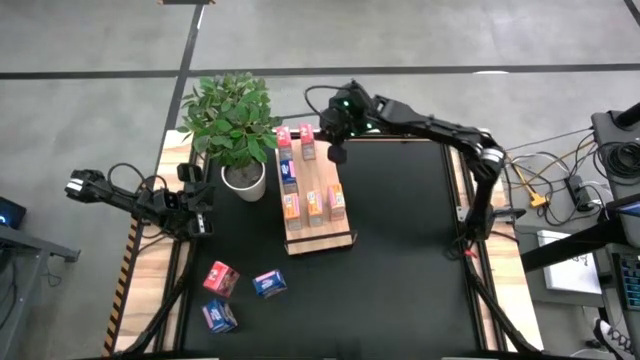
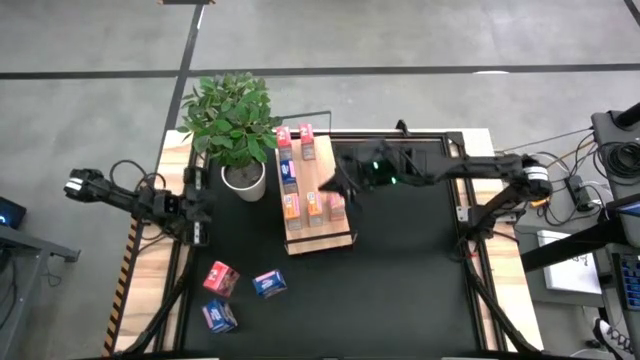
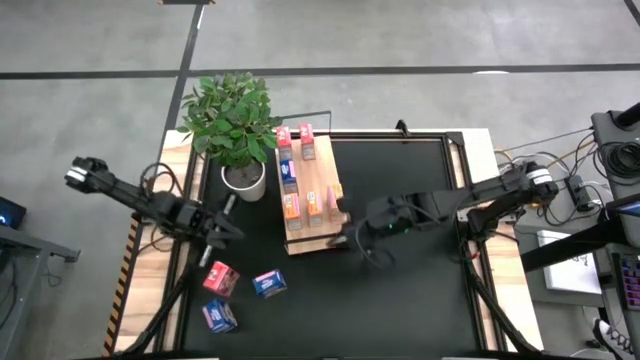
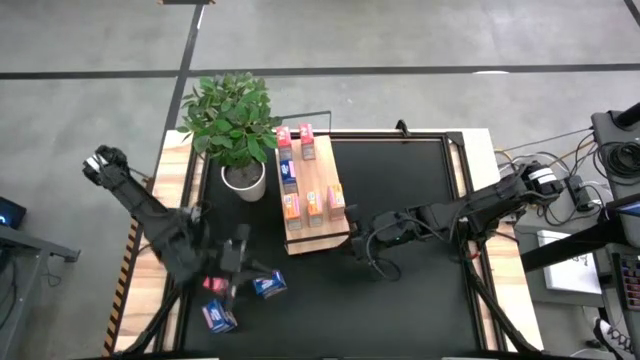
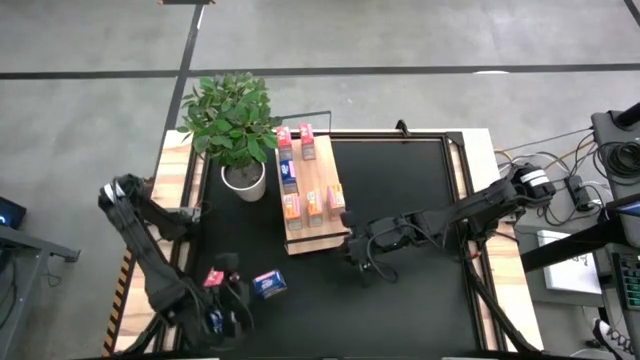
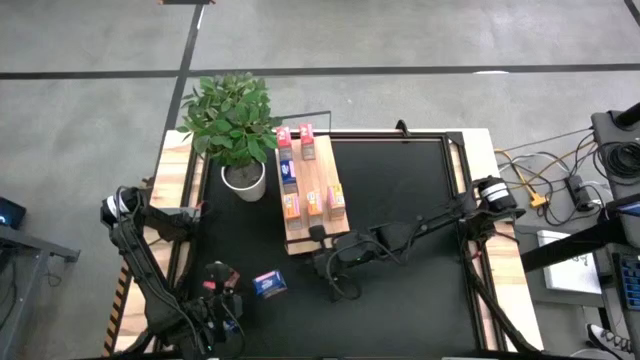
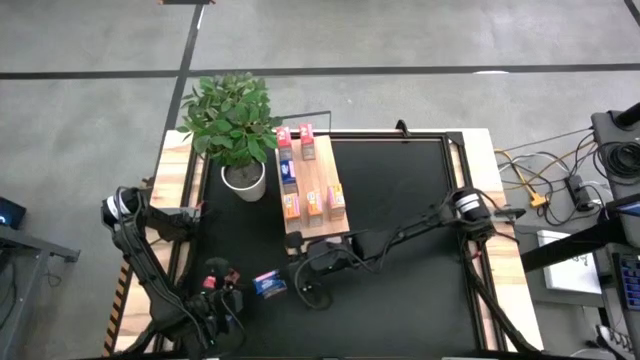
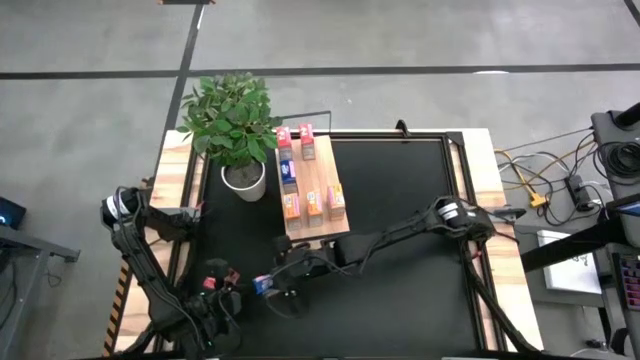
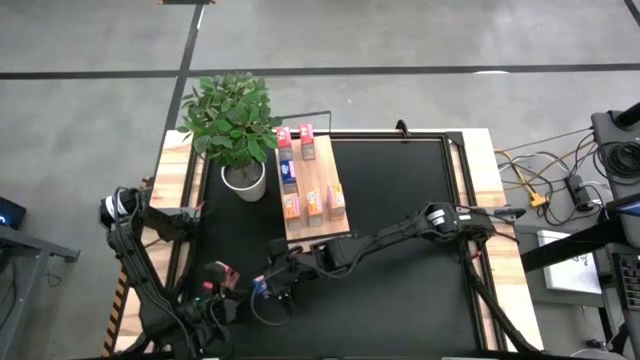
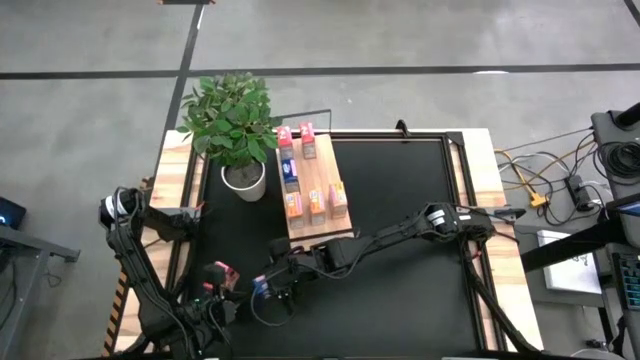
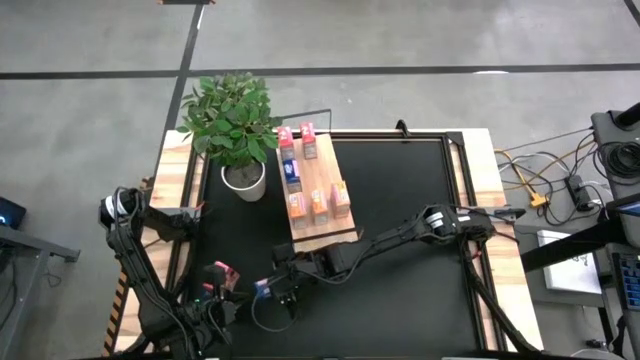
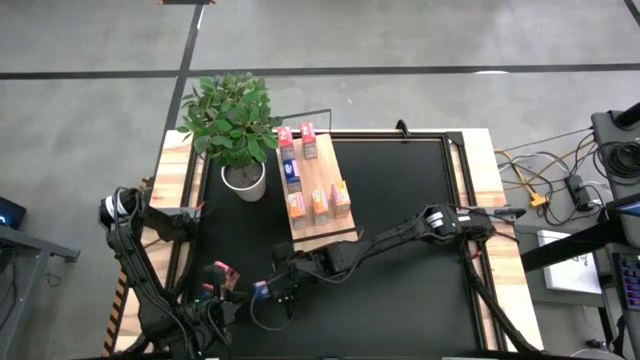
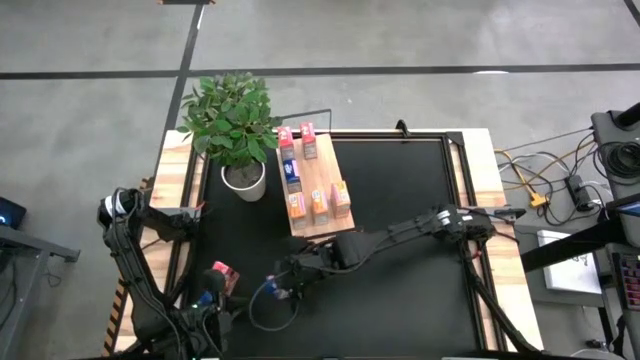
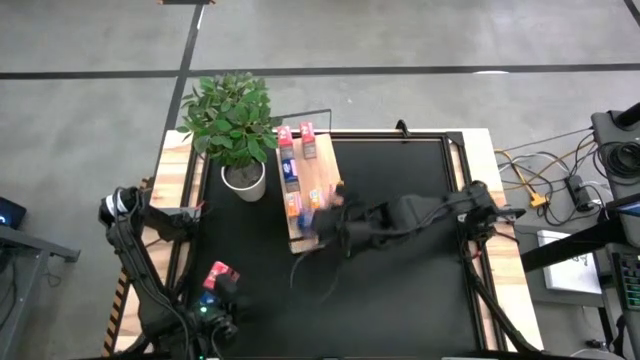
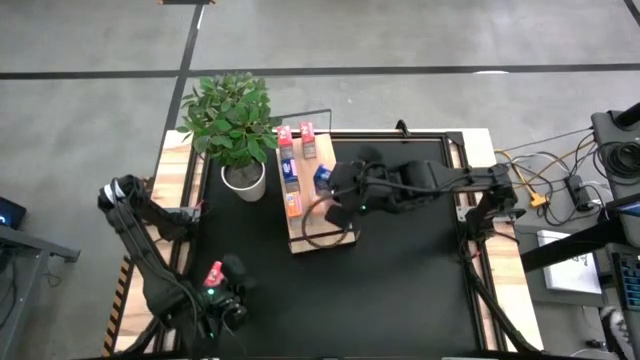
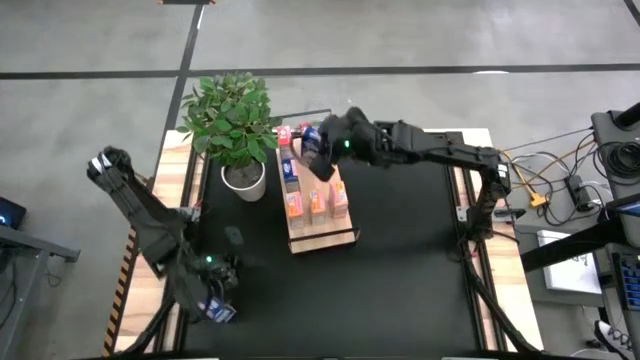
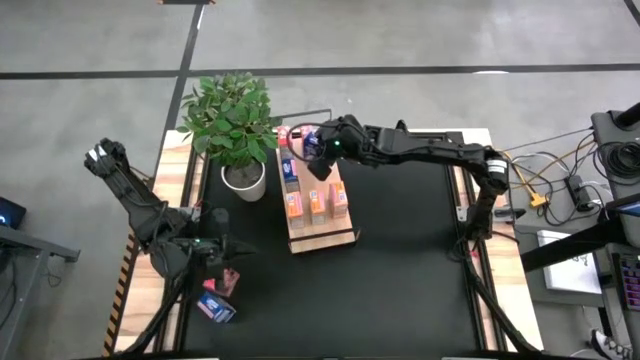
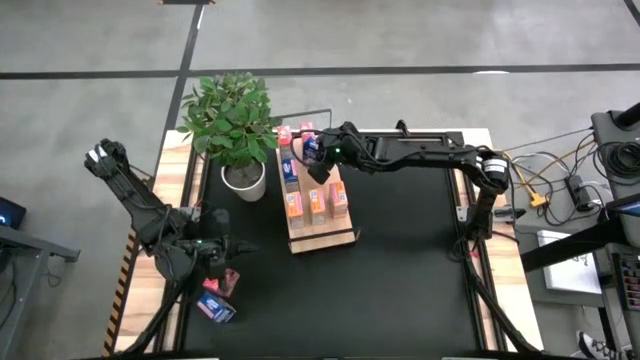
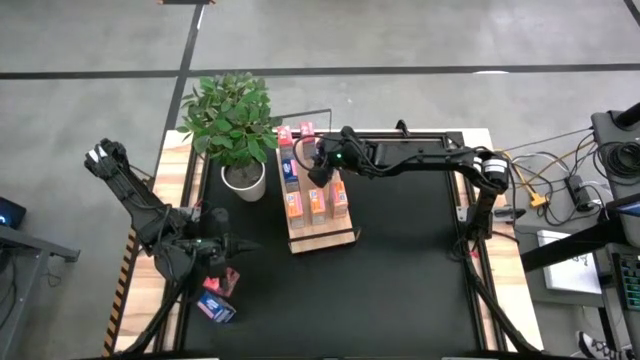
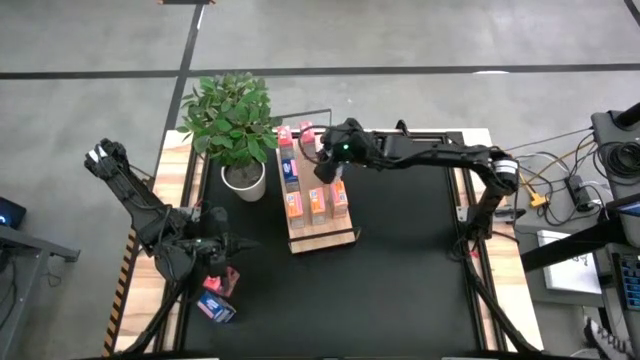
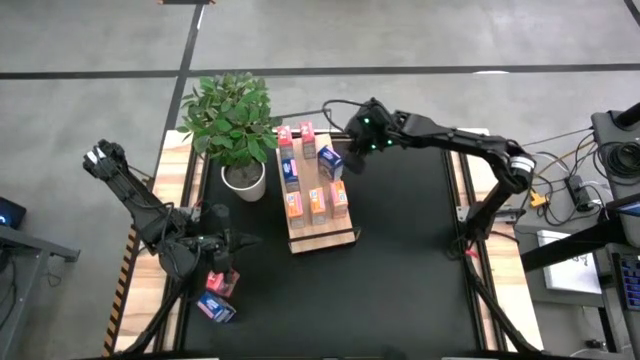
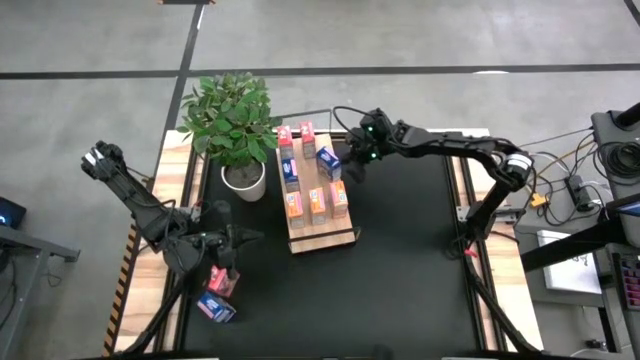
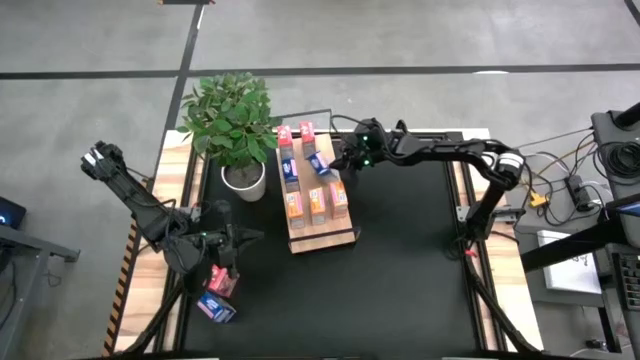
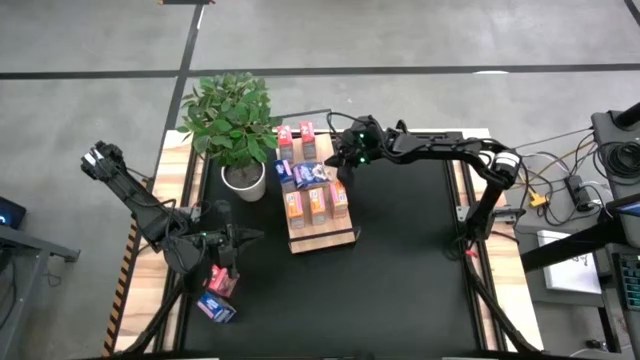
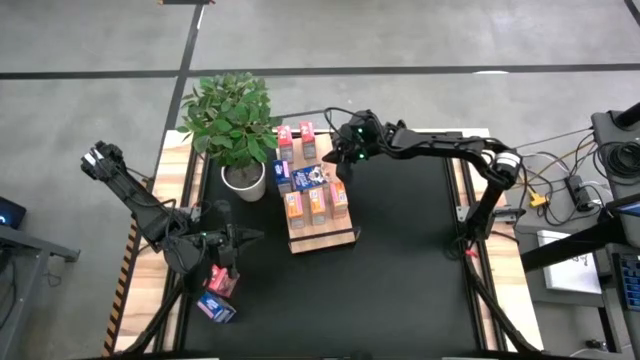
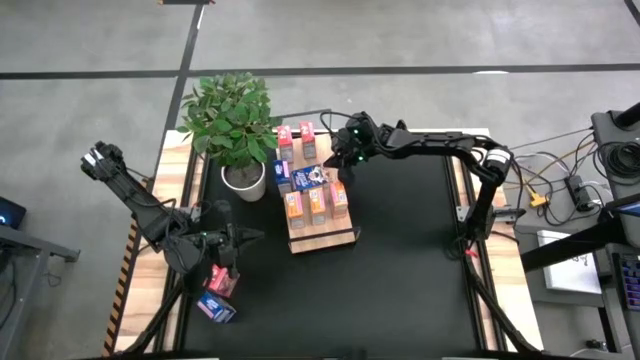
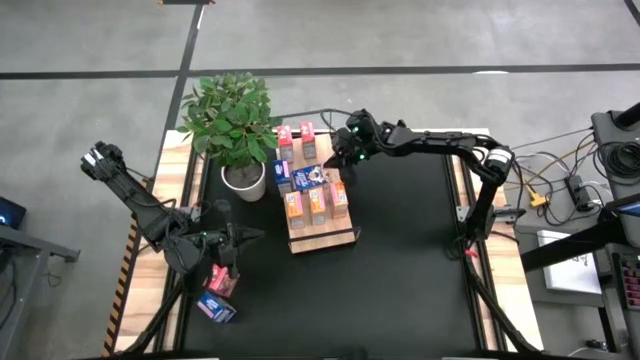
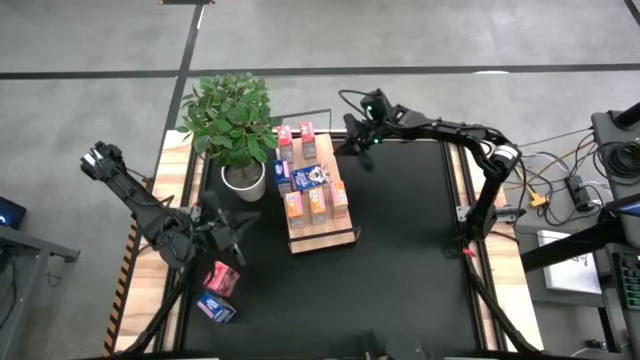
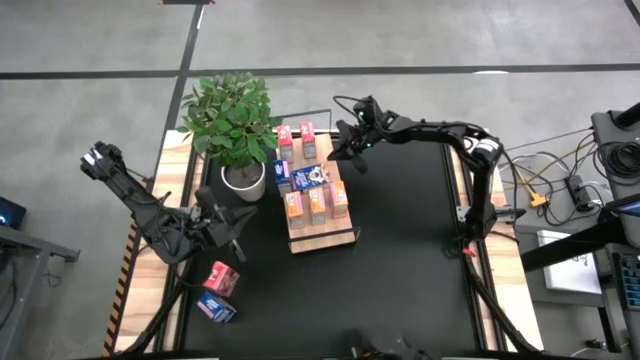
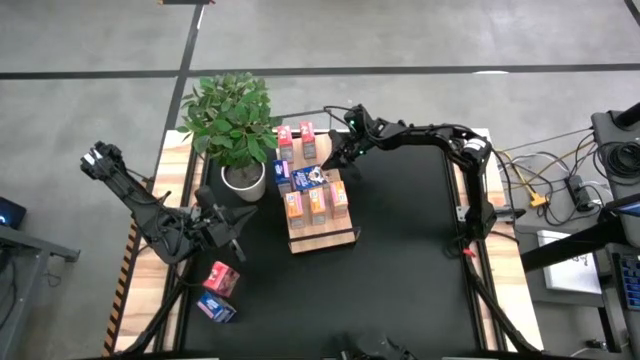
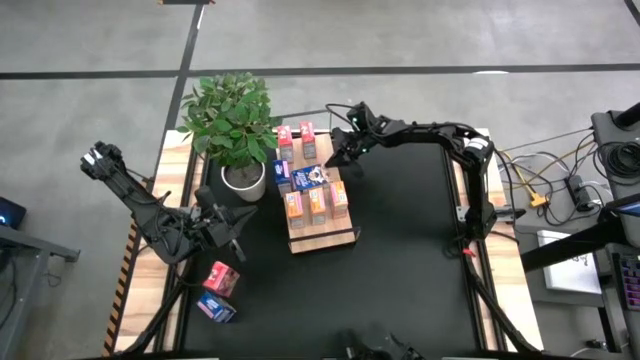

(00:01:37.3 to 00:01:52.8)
Task: Stack cereal on shelf
Put the bottom blue cereal box on the shelf aligned with the other blue cereal box

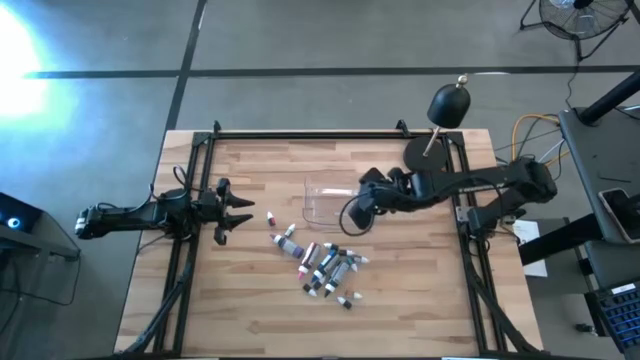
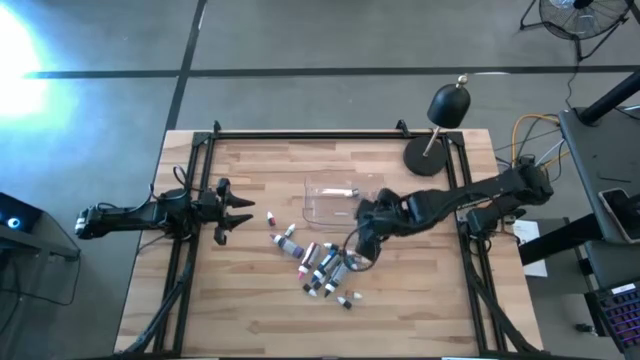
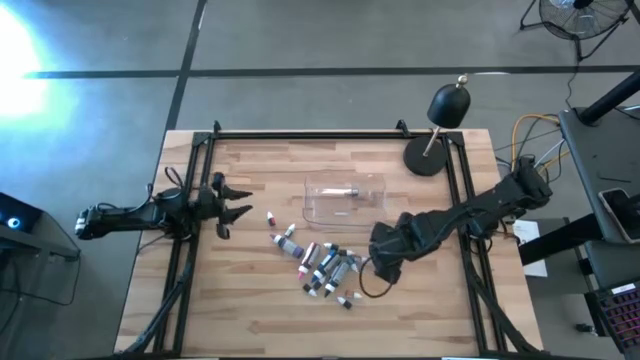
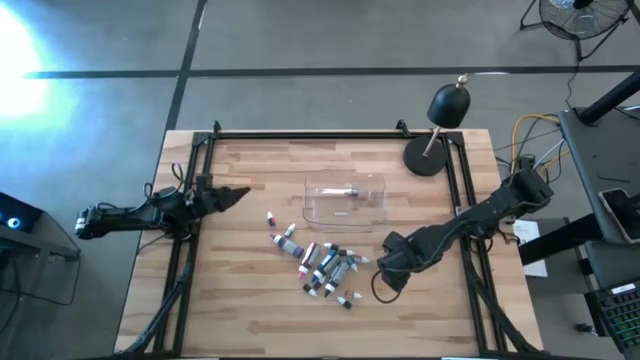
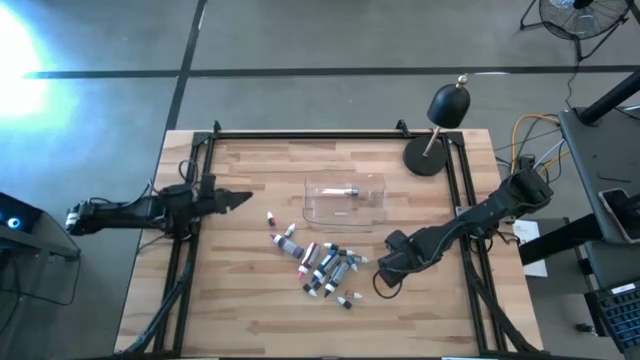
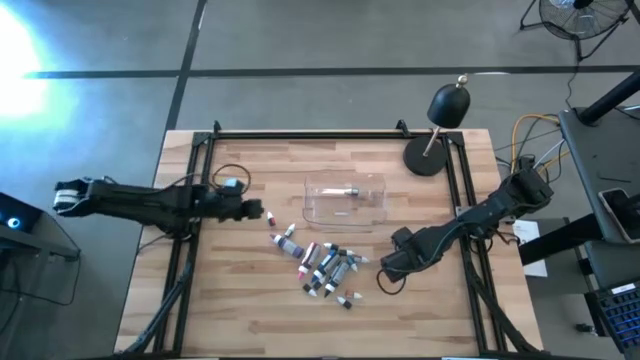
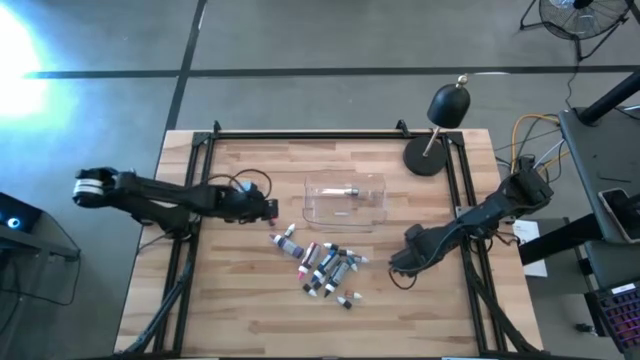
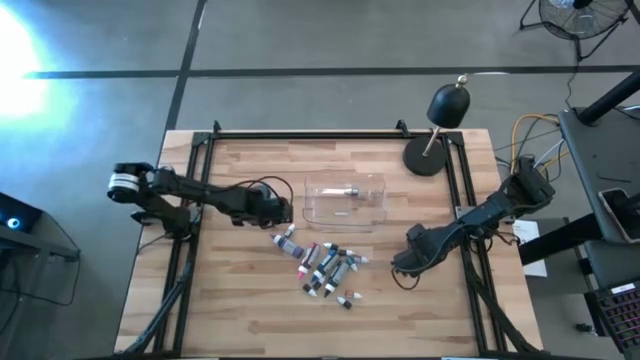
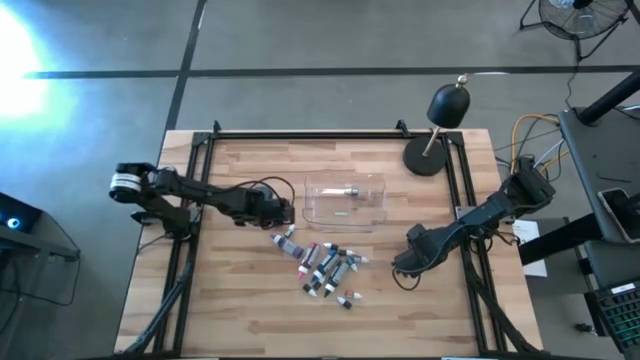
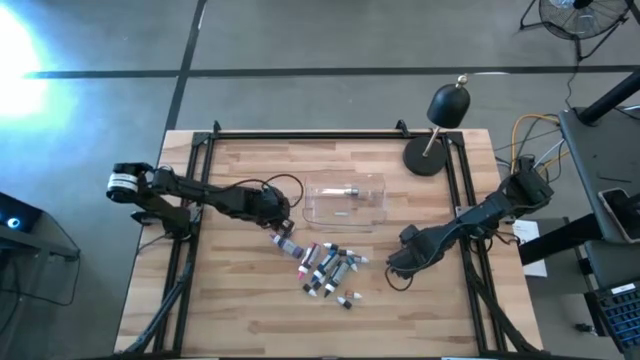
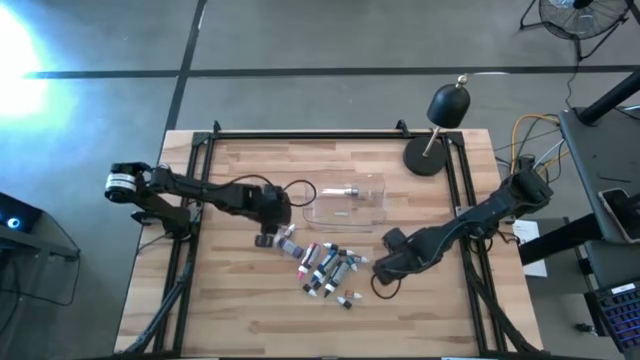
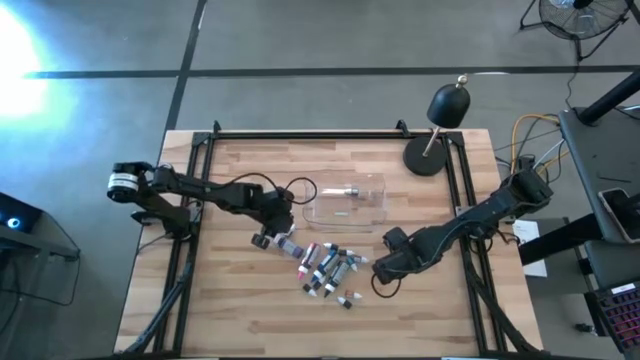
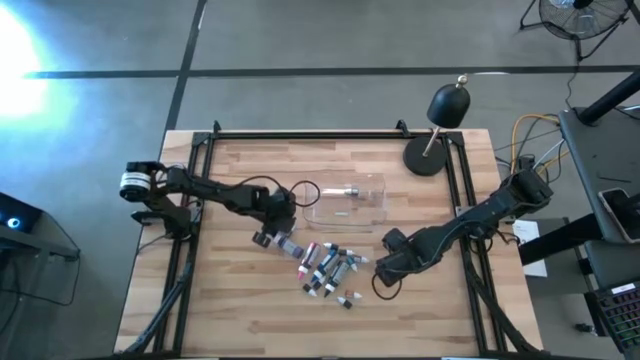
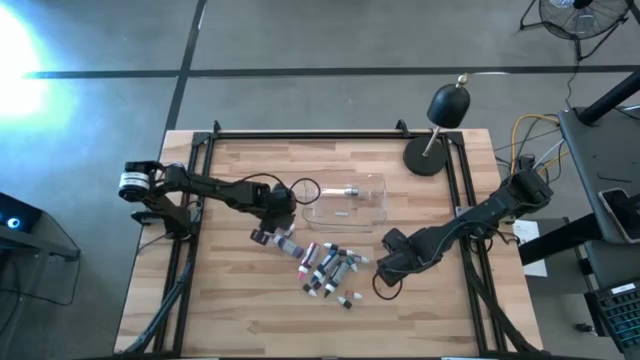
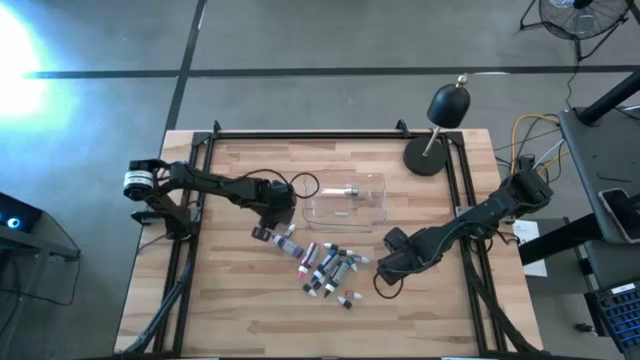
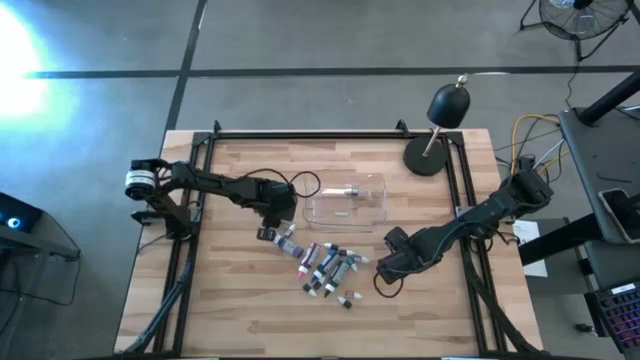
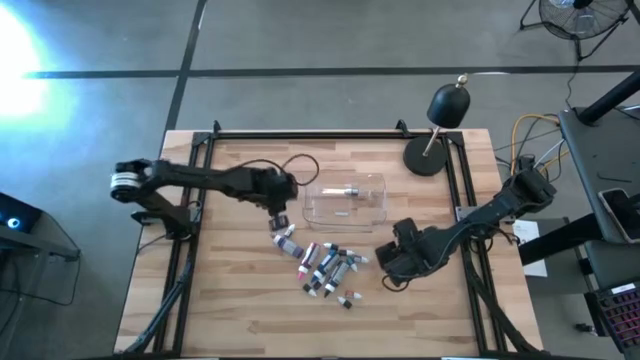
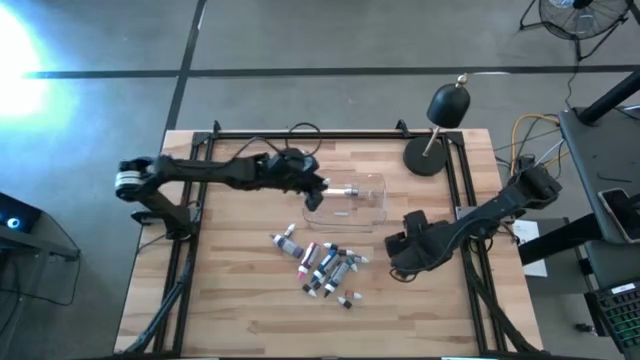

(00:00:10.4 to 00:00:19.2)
Task: Pick & Place food coloring
Put the top small red food coloring bottle into the transparent bin
